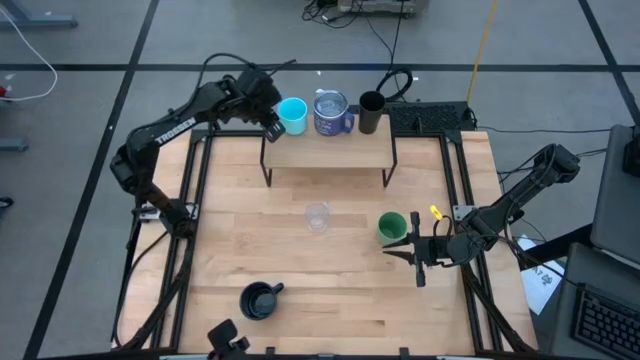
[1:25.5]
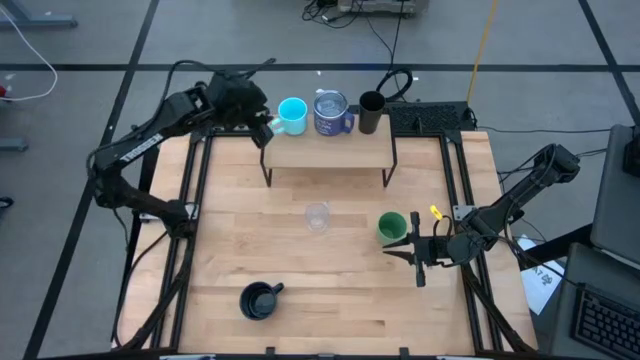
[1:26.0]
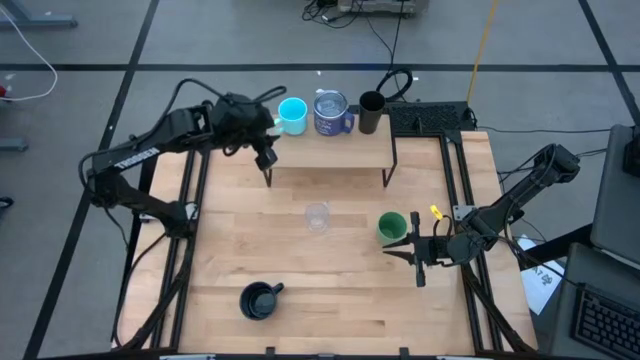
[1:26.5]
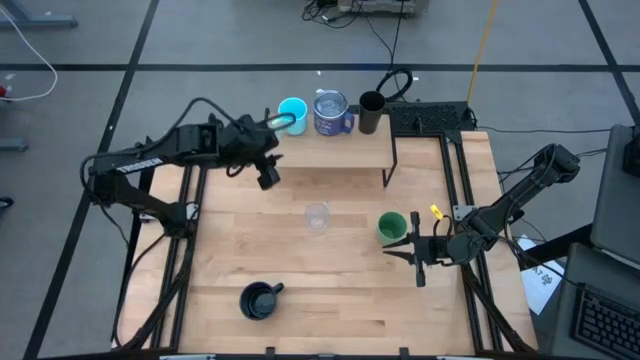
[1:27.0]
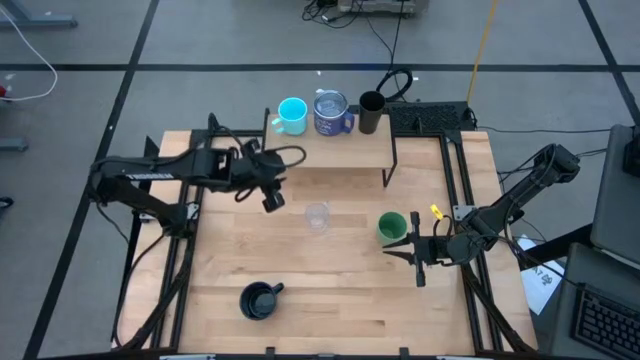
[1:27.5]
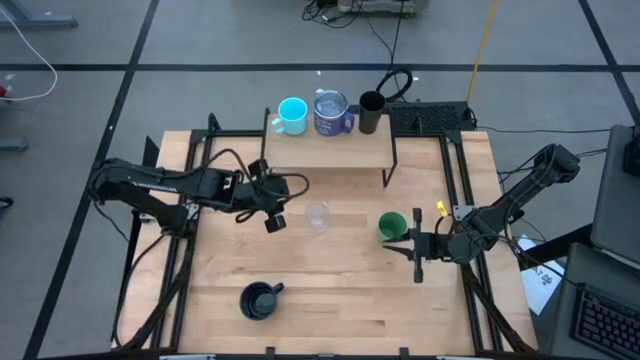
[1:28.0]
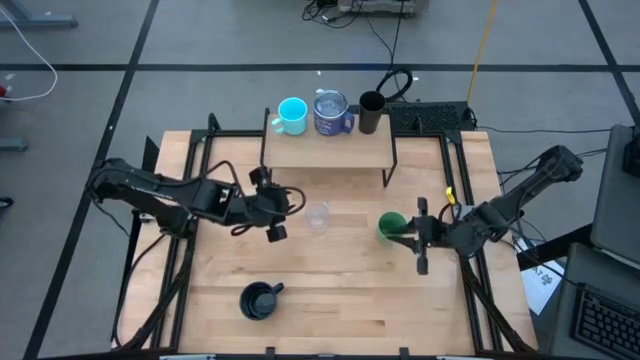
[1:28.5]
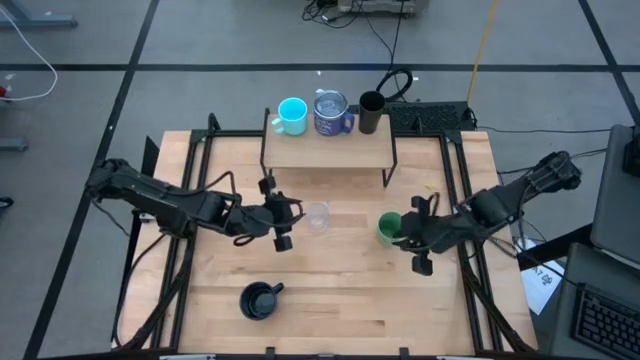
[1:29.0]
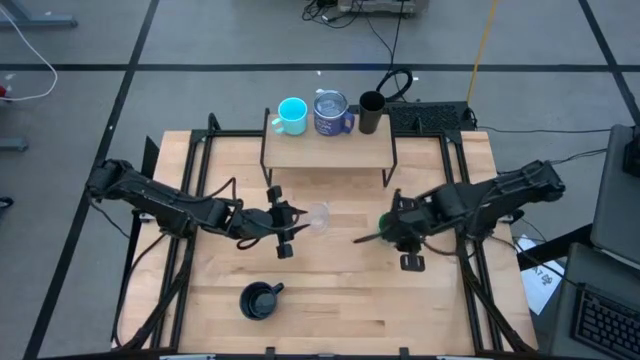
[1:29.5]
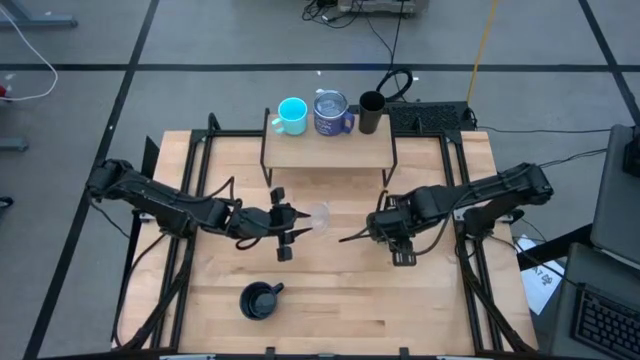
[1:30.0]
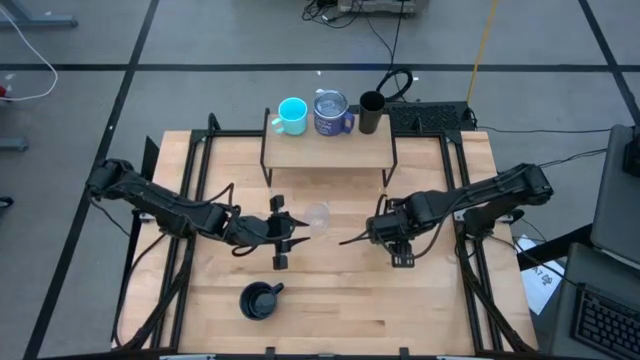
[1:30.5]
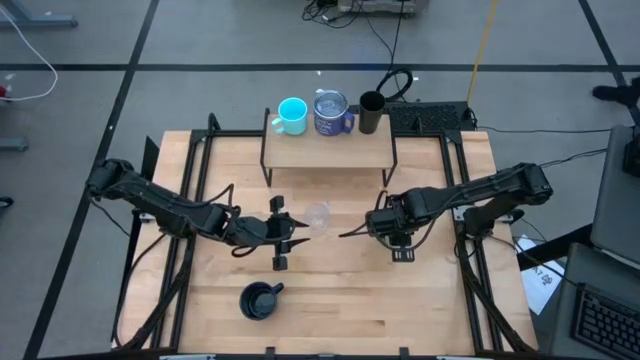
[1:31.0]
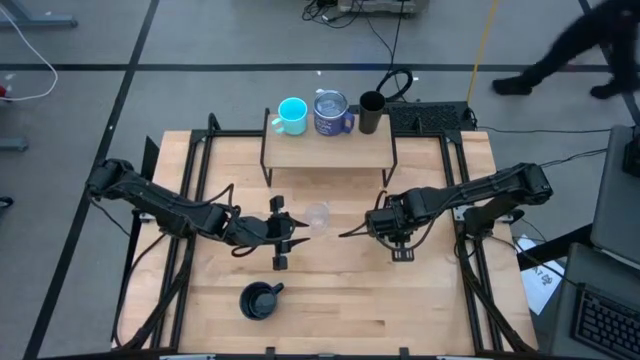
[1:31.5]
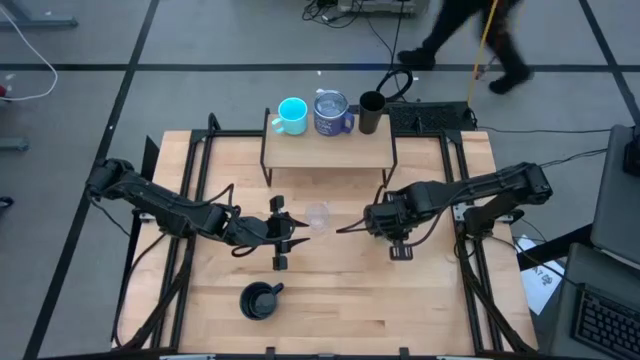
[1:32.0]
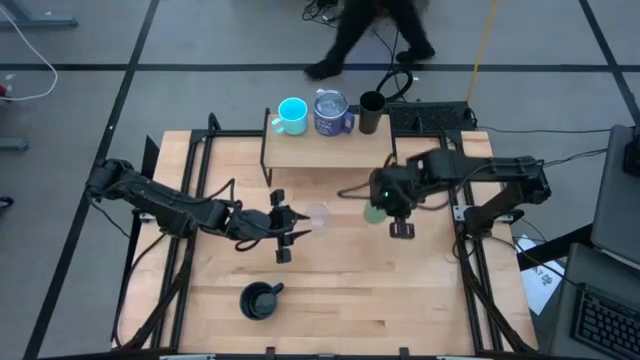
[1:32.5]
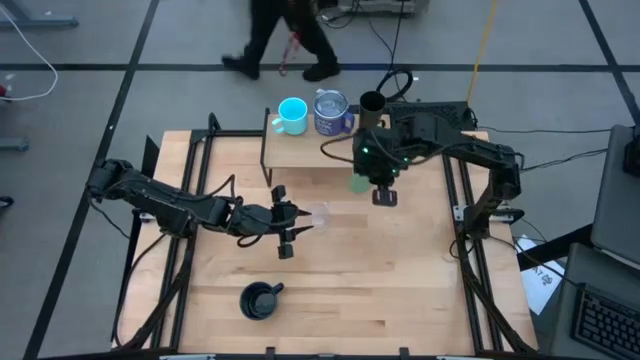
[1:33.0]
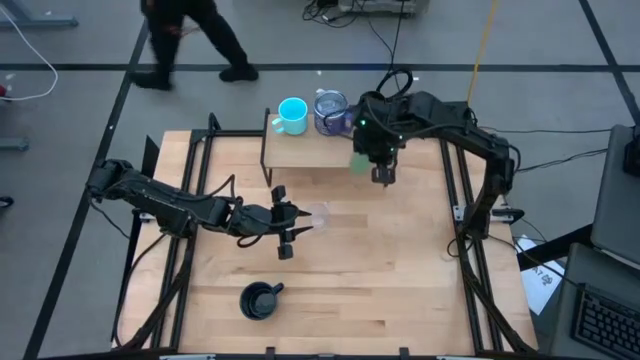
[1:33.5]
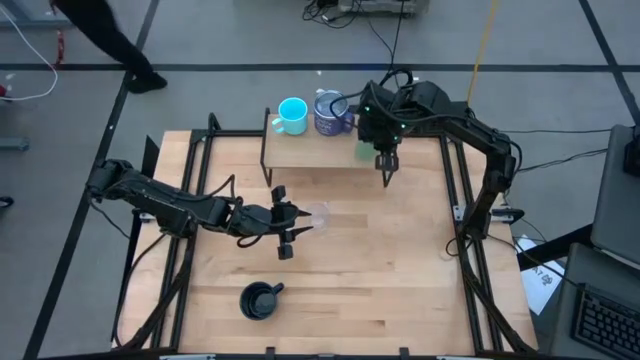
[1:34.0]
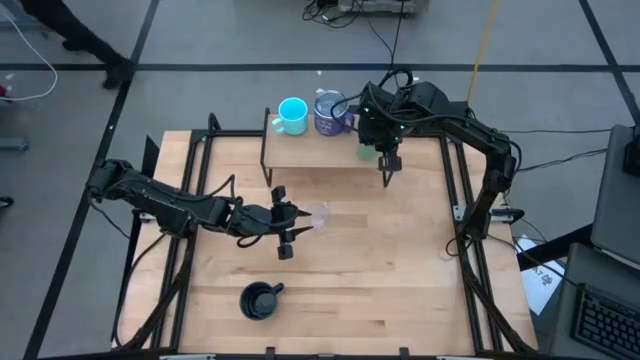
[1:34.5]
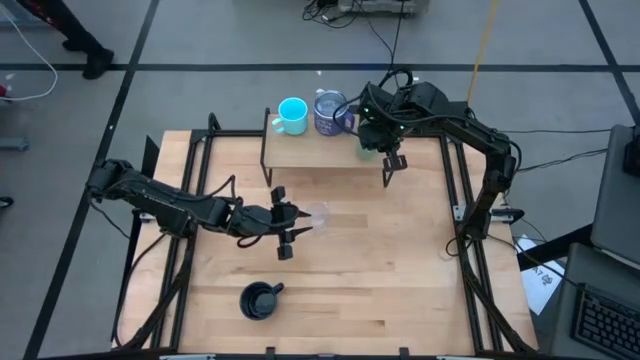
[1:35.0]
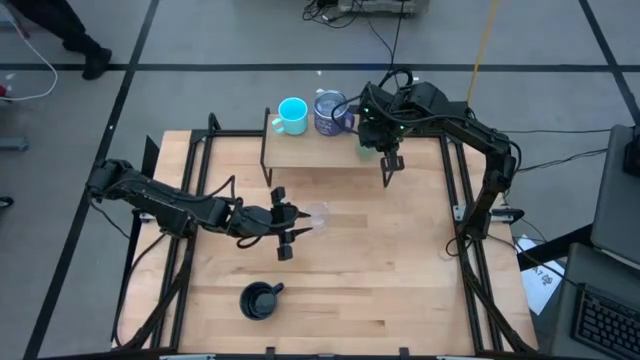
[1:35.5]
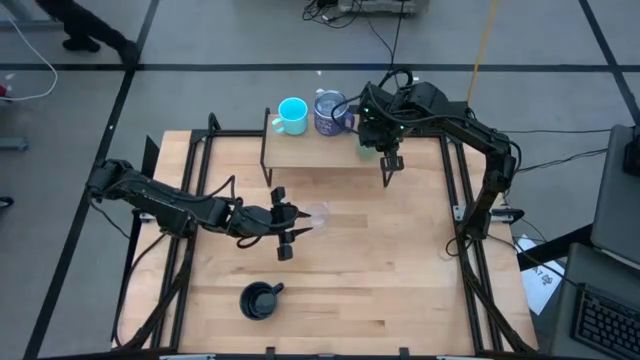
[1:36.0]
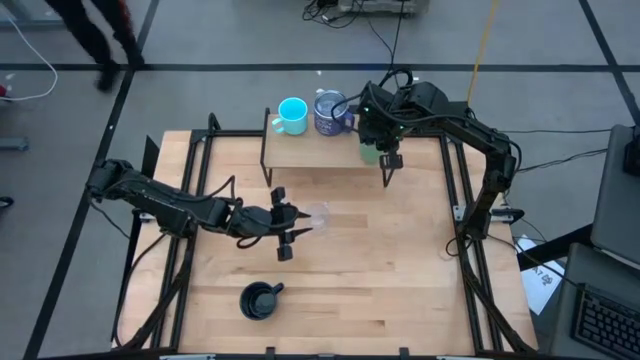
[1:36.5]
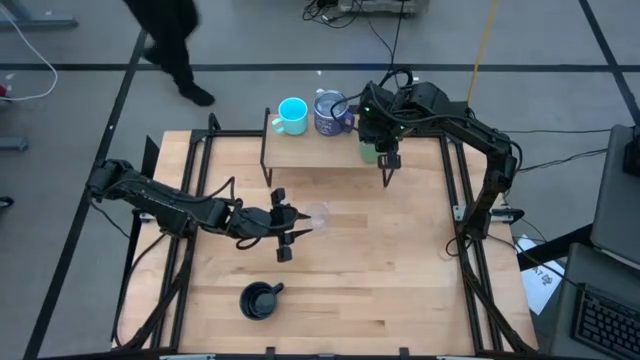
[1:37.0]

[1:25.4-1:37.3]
Task: Stack small to large cups/mugs on shelf
Put the green cup on the shelf aligned with the other black cup

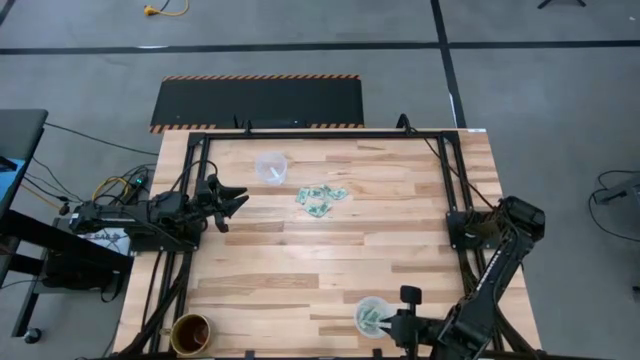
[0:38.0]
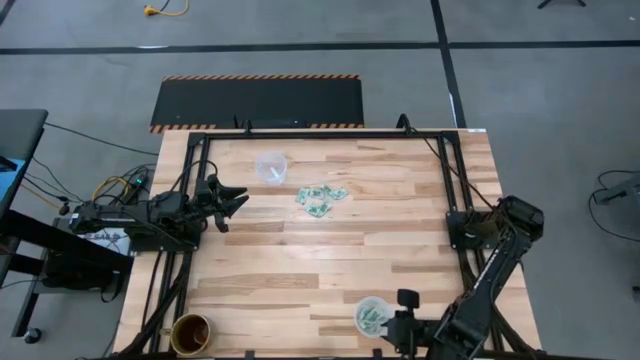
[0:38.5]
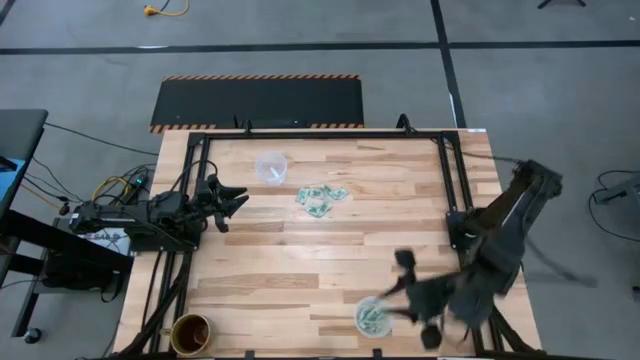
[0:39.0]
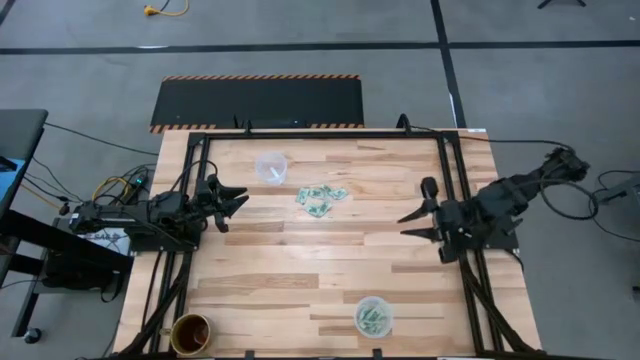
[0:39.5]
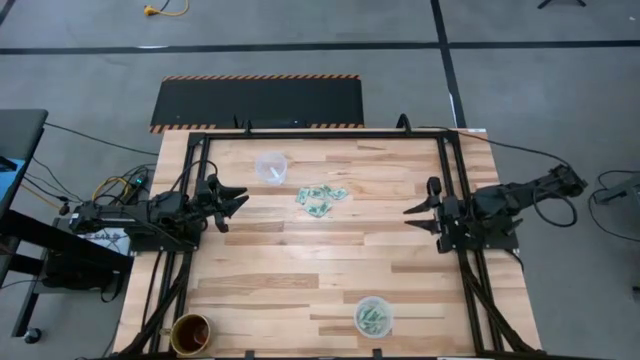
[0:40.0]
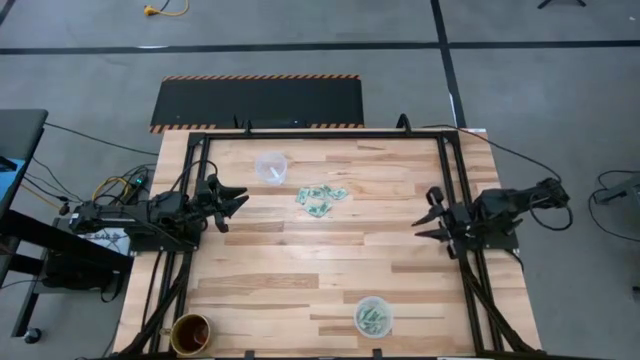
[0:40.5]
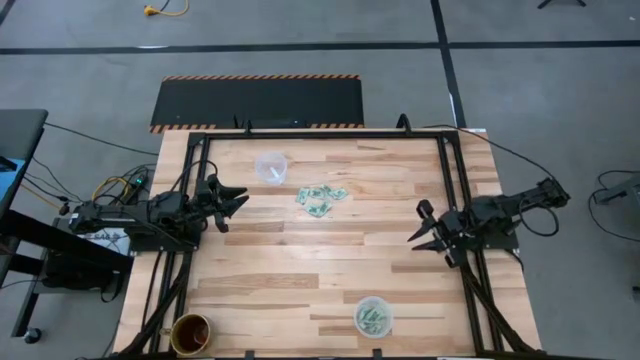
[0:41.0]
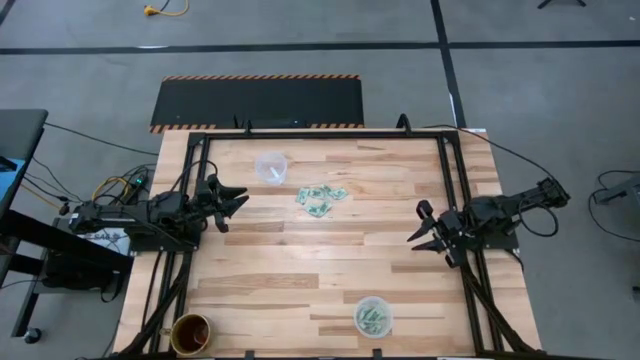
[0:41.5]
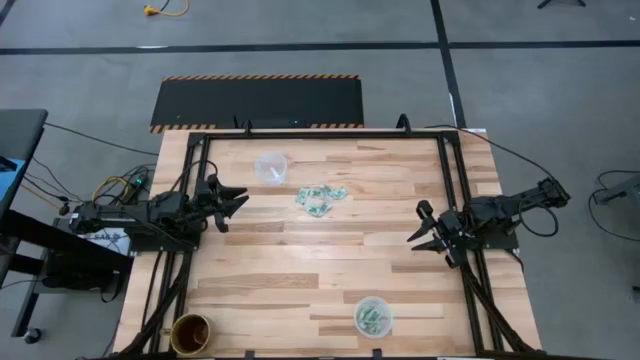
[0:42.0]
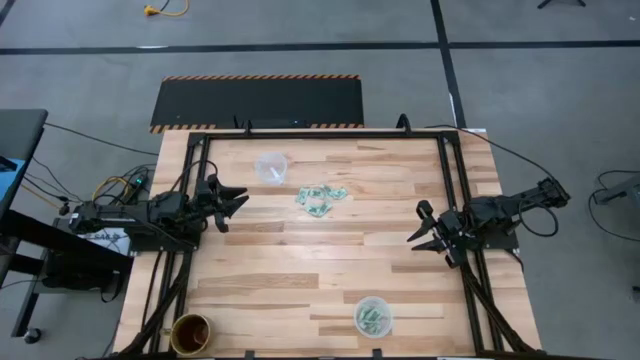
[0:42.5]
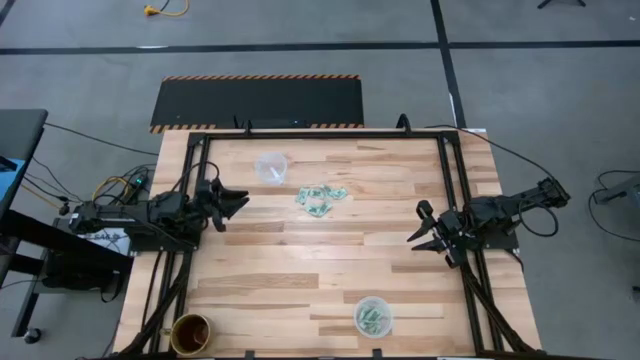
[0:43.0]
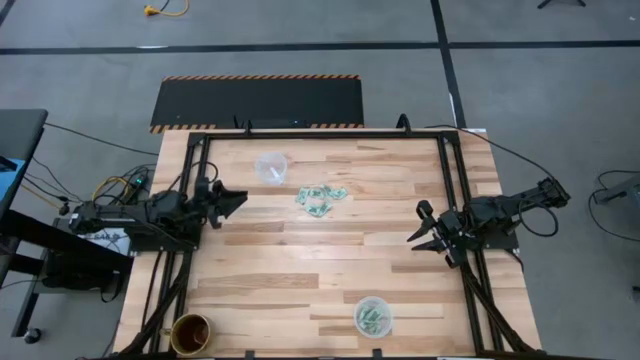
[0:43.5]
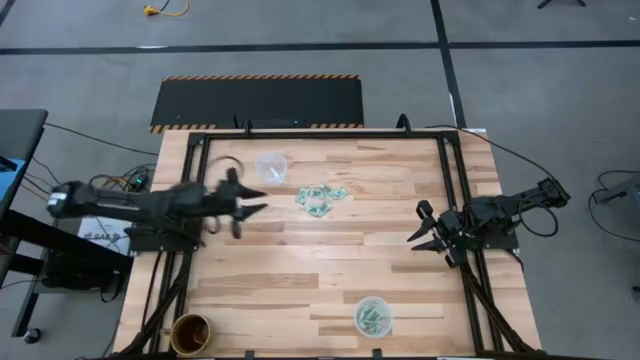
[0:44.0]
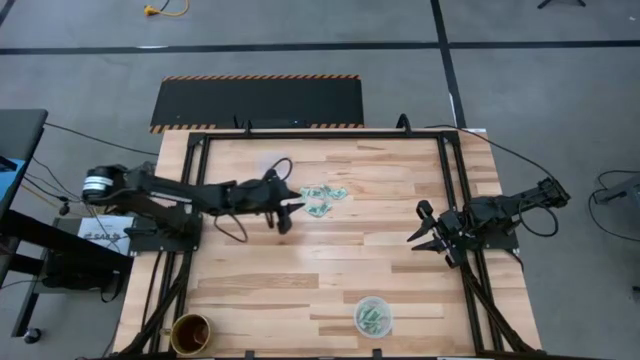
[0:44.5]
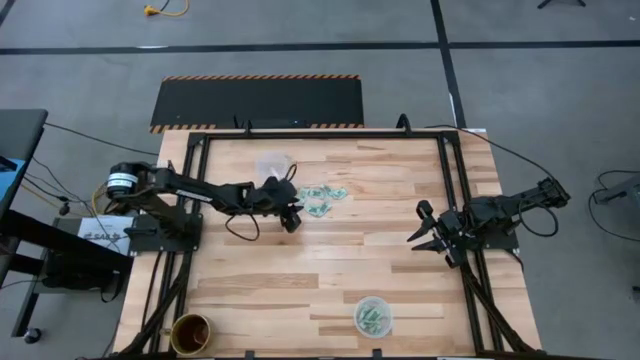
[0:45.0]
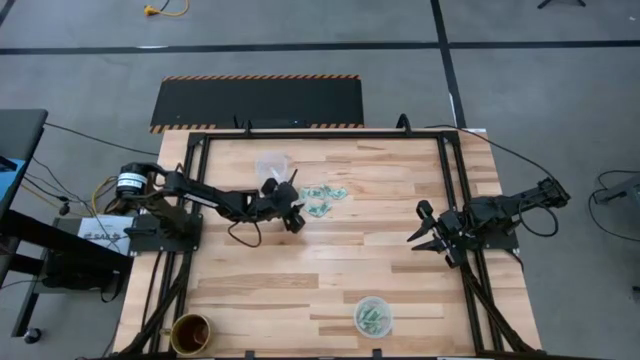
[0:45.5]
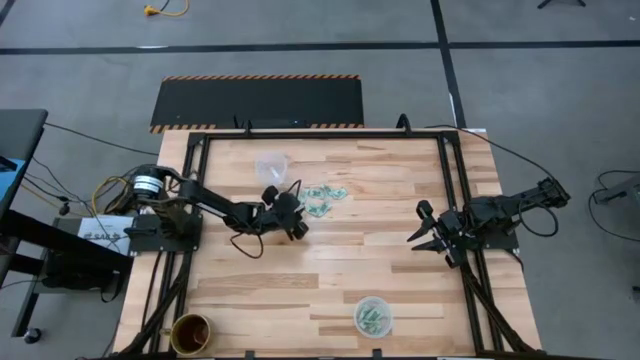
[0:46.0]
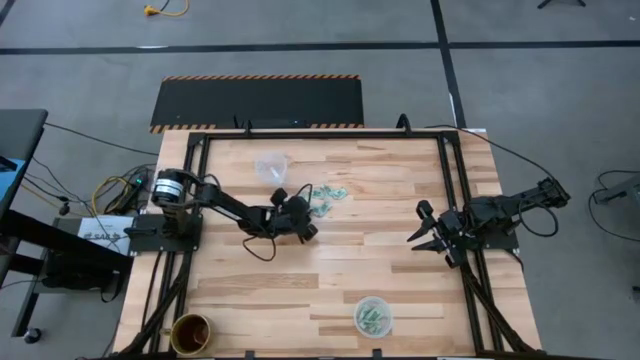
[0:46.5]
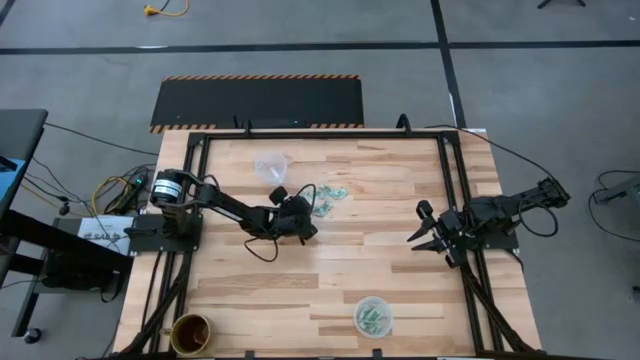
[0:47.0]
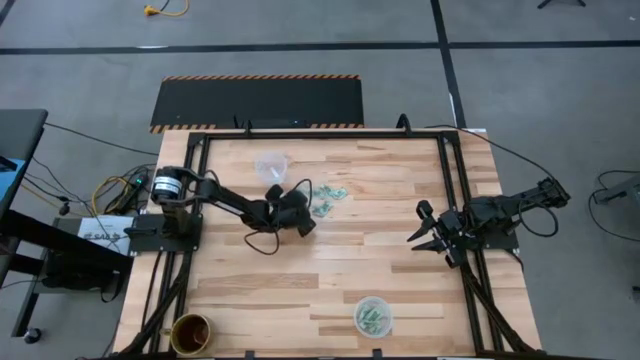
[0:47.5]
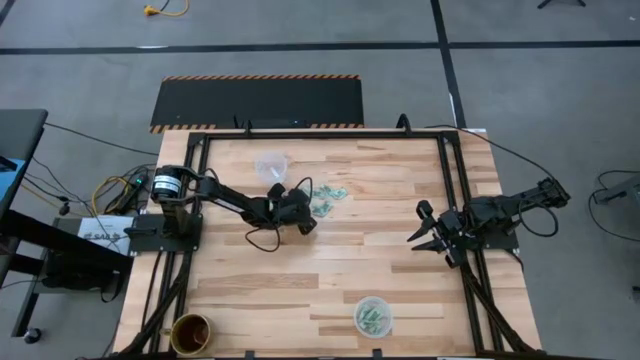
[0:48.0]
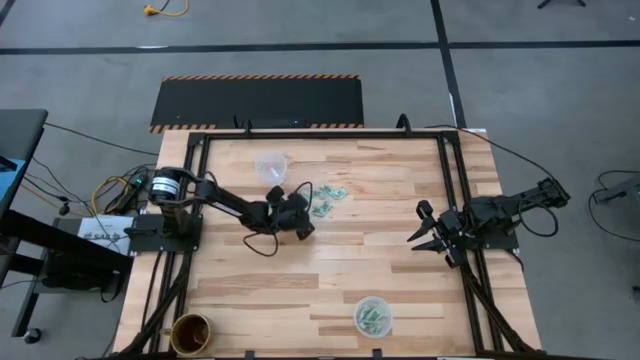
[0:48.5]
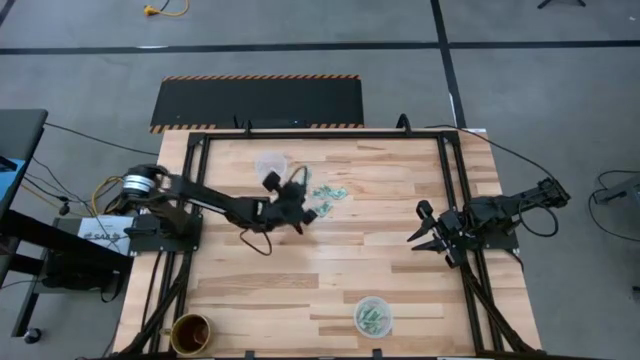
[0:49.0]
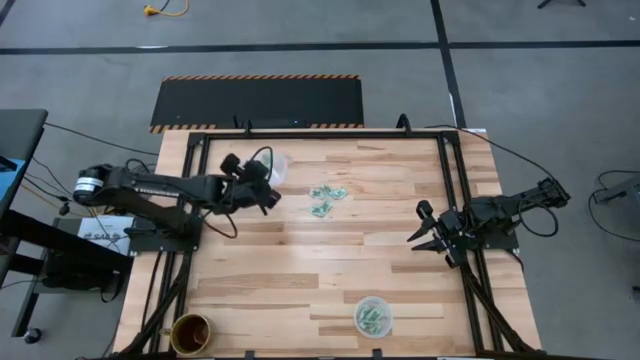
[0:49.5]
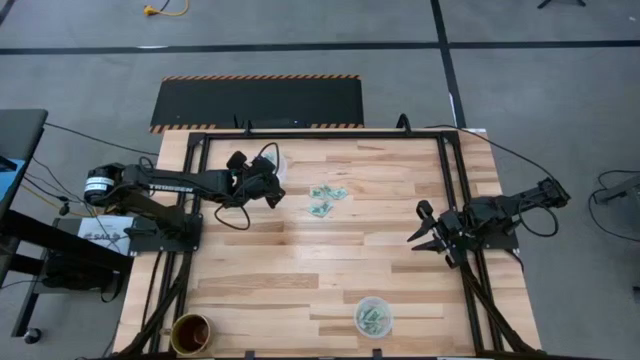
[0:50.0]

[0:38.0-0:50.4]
Task: Pick and place Stevia / Truvia into bins
Put the white stevia packet into the top transparent container
